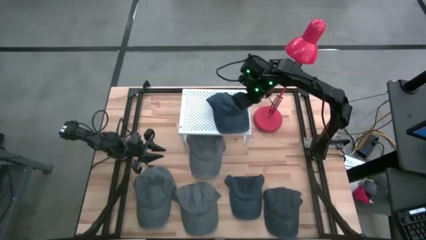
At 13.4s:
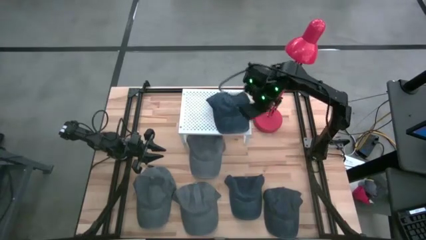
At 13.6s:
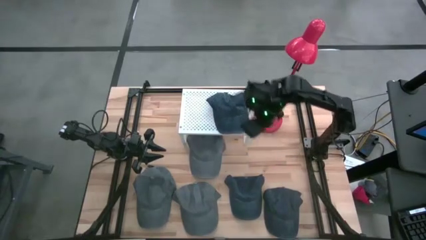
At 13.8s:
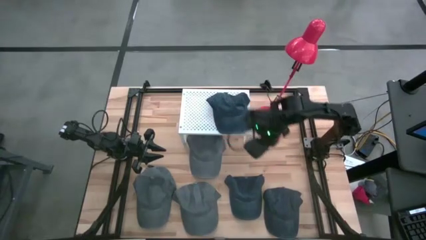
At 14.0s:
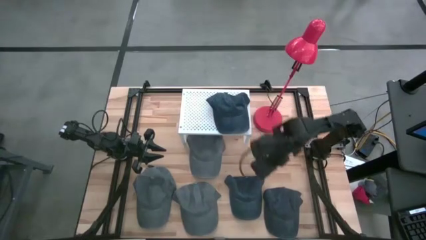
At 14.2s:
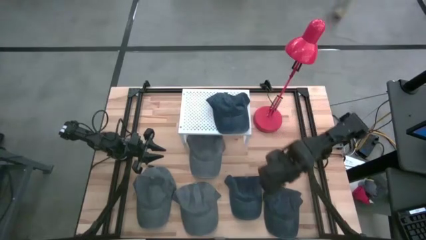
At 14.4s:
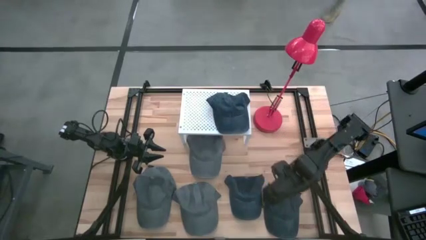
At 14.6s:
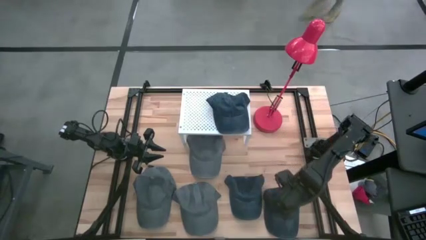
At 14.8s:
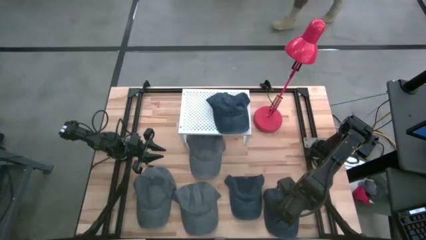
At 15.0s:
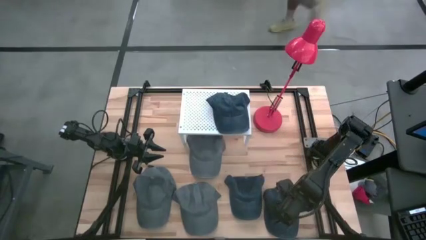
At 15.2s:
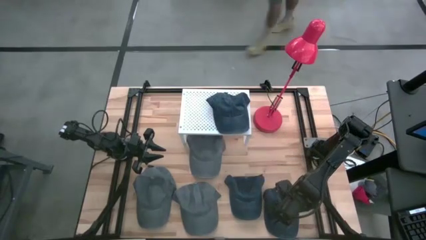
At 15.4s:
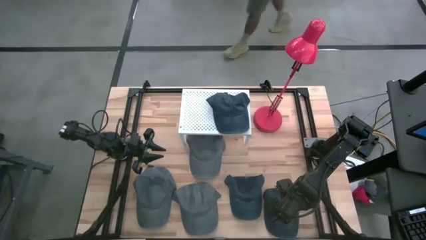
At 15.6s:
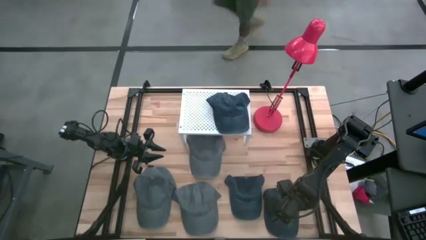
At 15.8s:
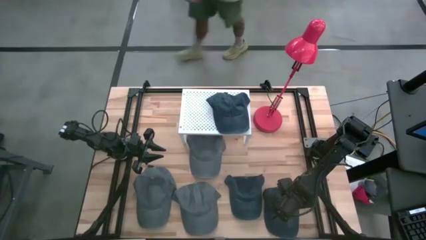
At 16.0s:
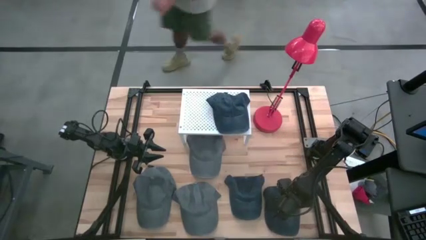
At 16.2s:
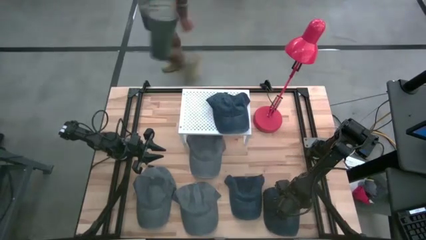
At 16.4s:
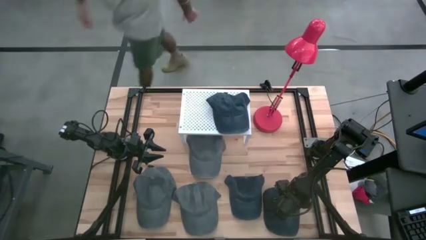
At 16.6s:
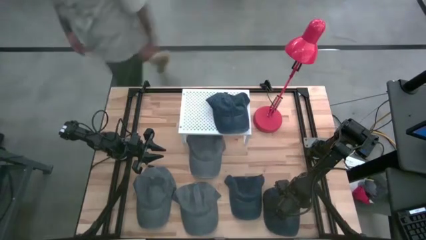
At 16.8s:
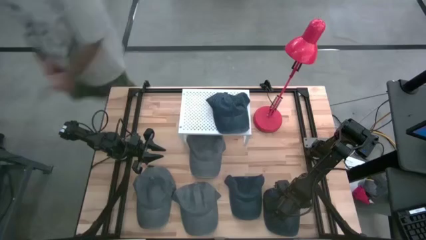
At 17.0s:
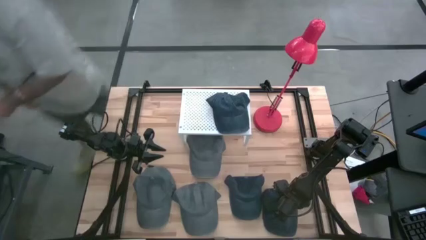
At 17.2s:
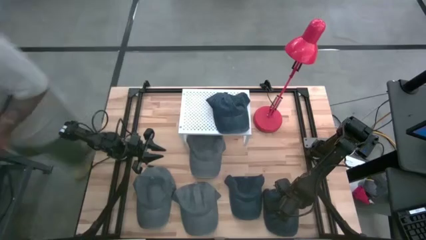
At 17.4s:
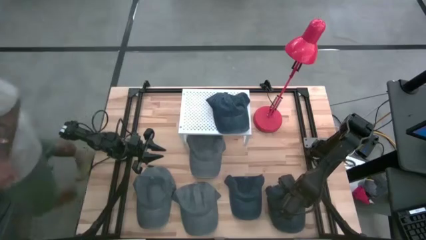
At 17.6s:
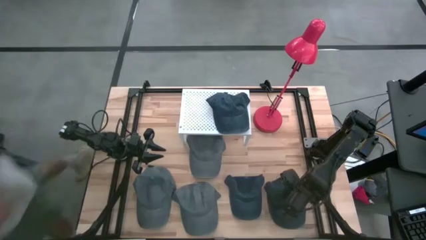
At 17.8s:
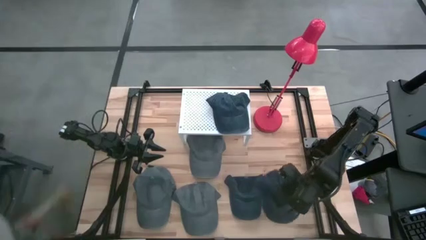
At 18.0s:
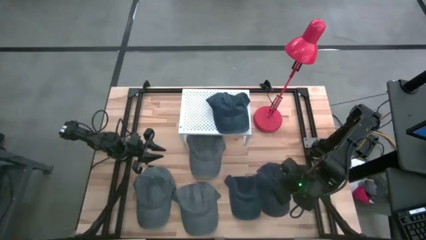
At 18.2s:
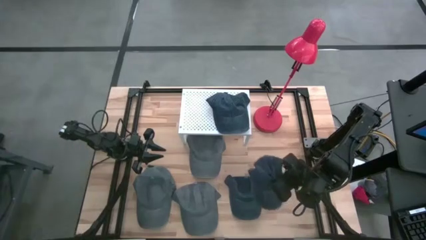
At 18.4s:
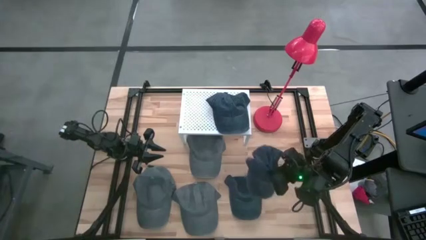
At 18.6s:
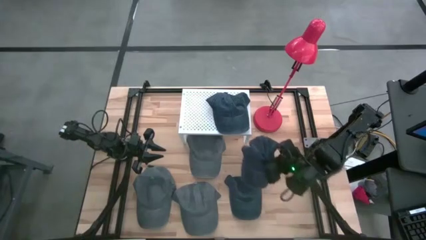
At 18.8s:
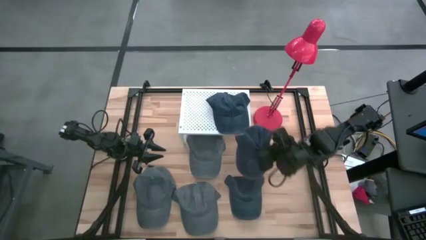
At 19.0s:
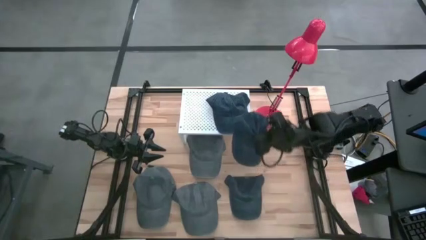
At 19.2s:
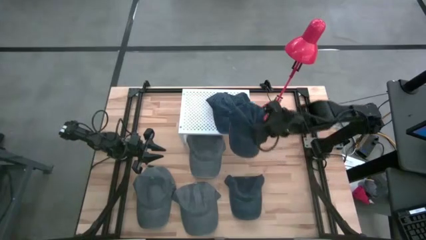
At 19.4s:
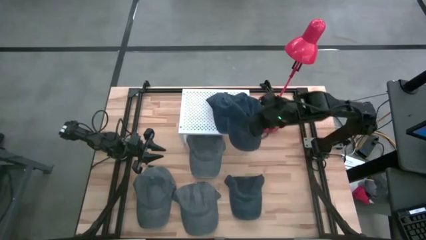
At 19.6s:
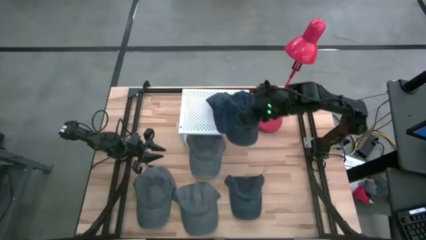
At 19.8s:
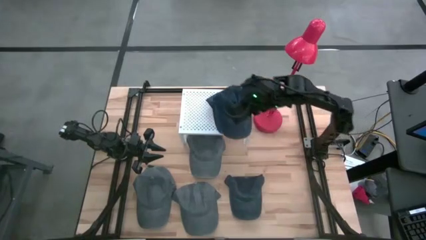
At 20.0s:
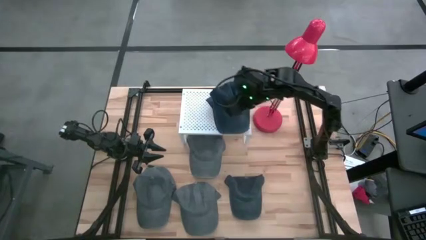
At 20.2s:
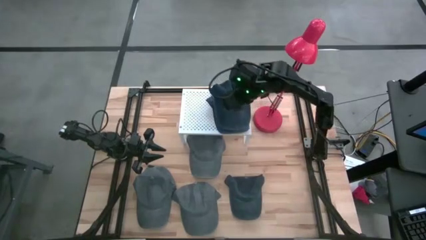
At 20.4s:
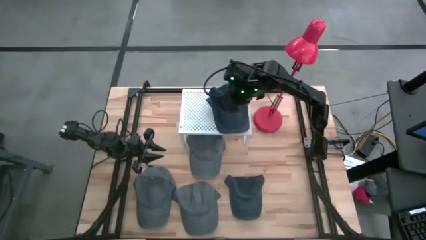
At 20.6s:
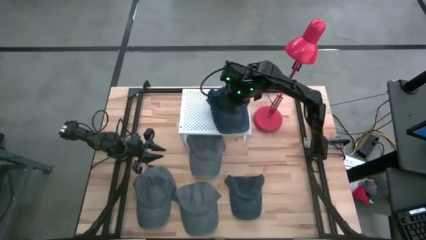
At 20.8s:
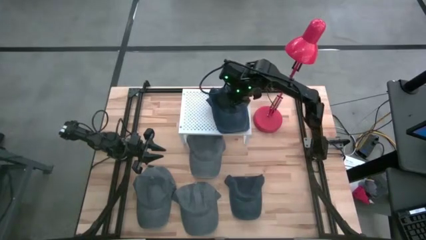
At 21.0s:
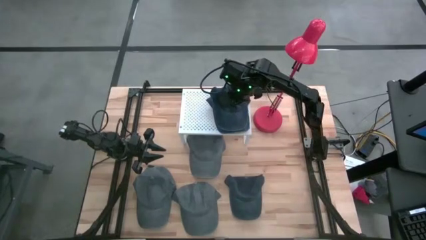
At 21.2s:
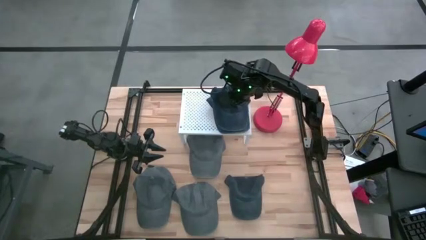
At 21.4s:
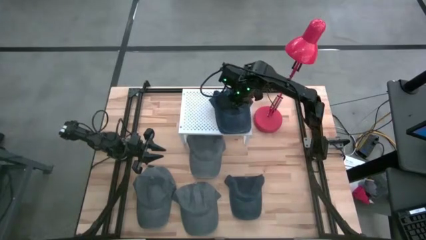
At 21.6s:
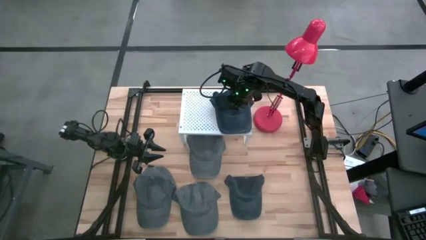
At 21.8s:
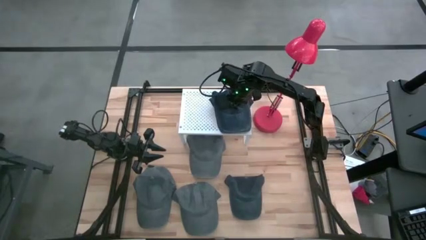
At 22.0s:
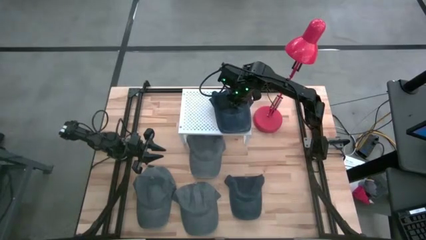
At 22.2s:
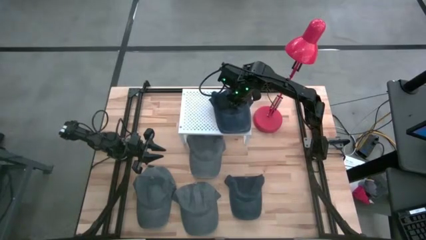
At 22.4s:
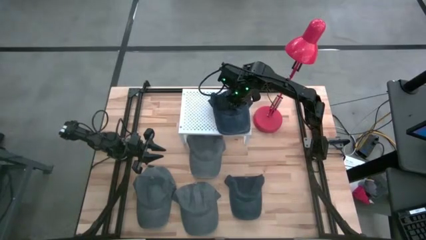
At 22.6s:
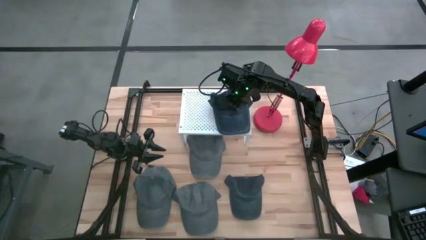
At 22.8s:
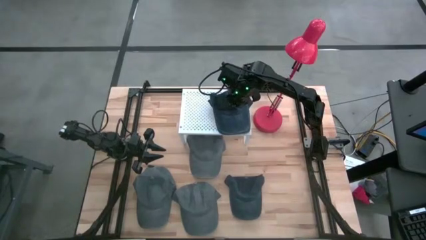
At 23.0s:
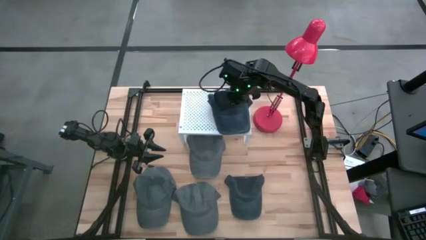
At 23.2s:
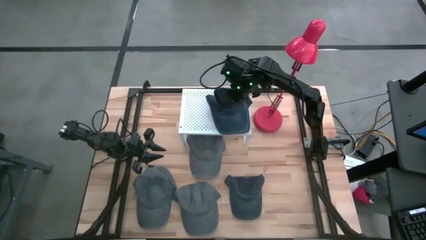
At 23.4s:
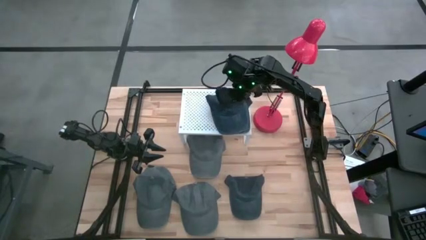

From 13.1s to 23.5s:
Task: Pick & Place hat
Stack the right black cap on top of the black cap on the shelf

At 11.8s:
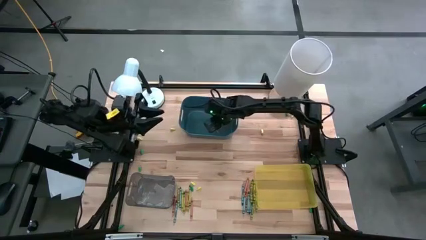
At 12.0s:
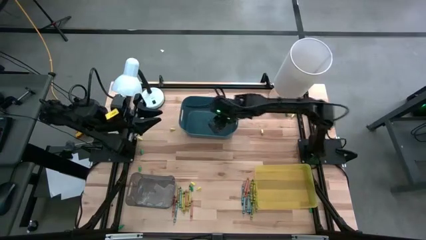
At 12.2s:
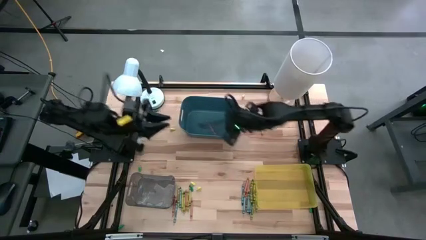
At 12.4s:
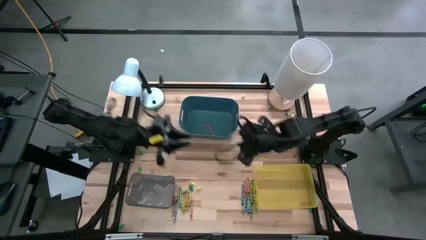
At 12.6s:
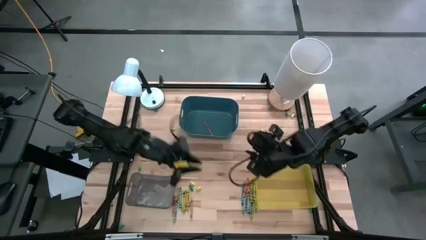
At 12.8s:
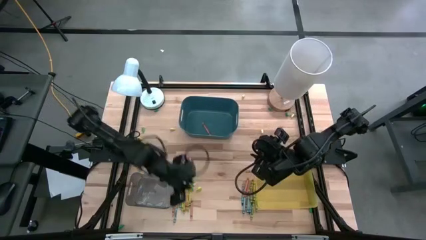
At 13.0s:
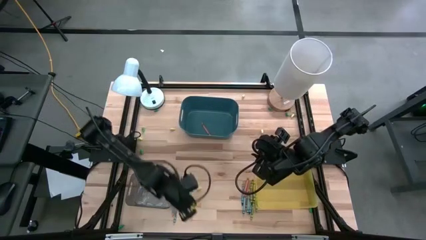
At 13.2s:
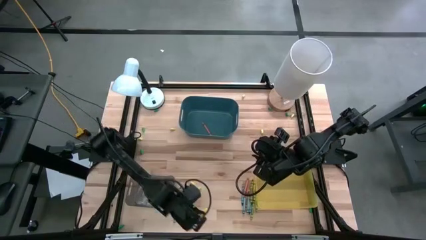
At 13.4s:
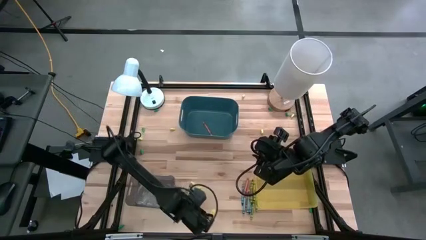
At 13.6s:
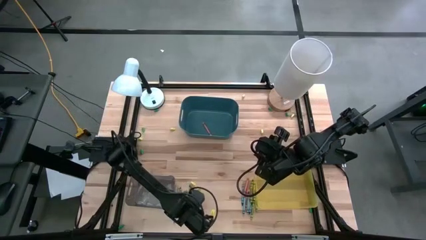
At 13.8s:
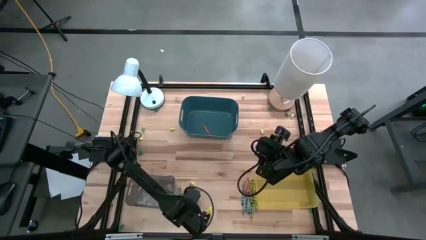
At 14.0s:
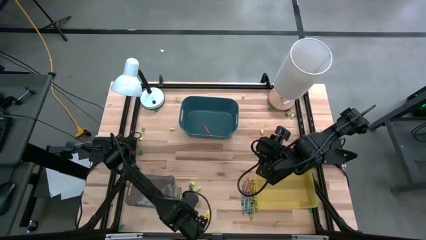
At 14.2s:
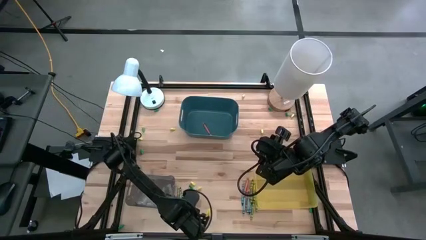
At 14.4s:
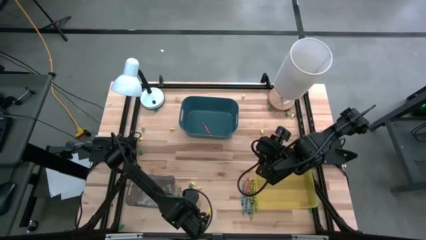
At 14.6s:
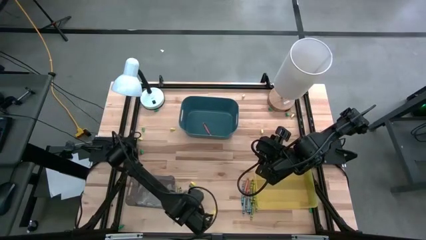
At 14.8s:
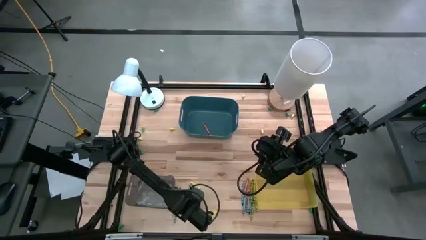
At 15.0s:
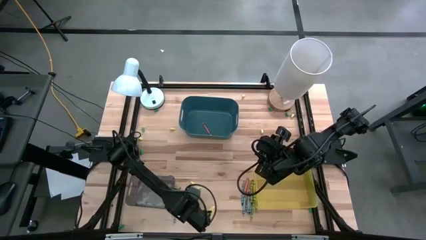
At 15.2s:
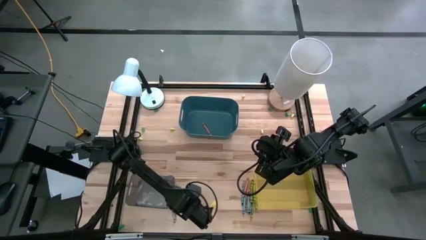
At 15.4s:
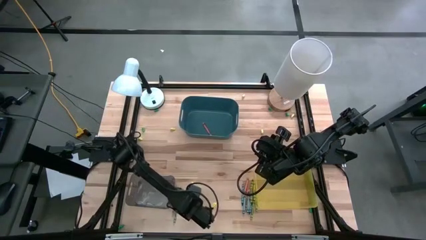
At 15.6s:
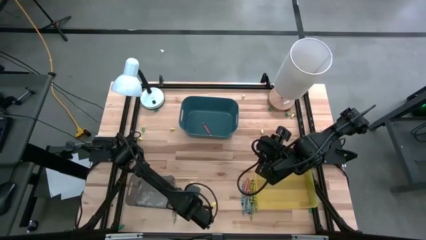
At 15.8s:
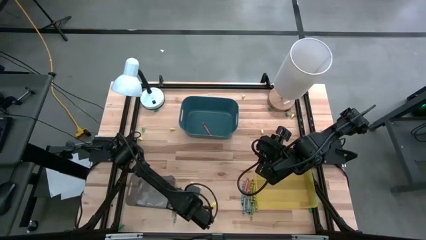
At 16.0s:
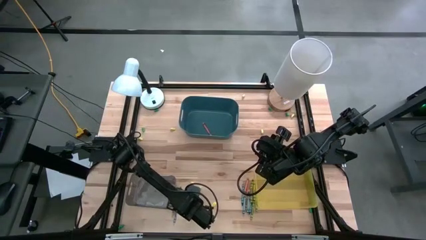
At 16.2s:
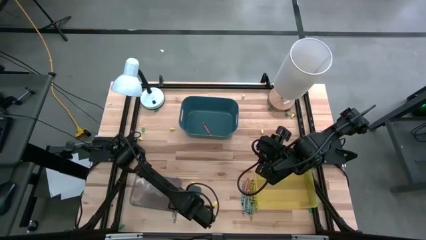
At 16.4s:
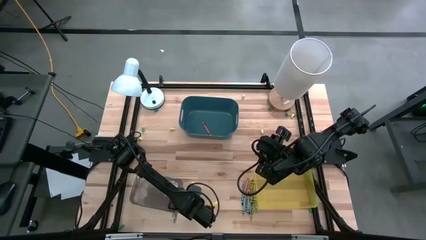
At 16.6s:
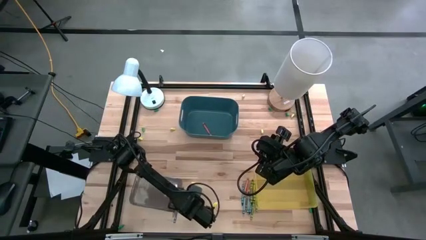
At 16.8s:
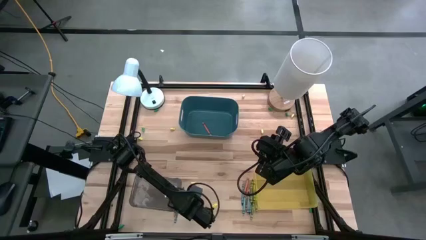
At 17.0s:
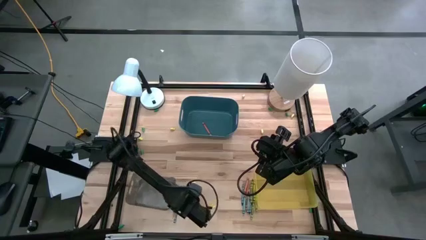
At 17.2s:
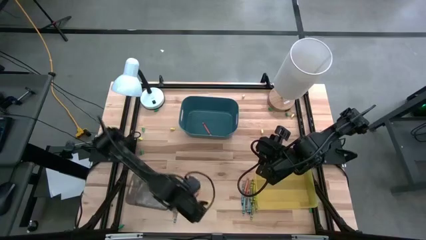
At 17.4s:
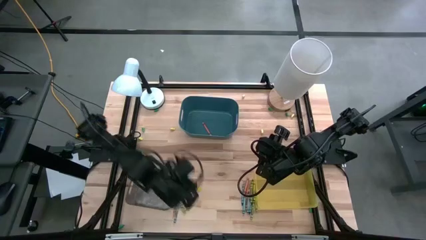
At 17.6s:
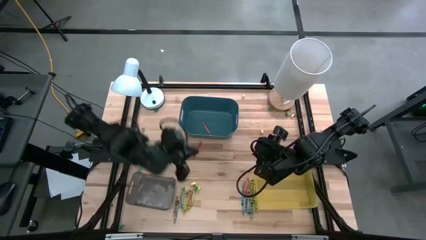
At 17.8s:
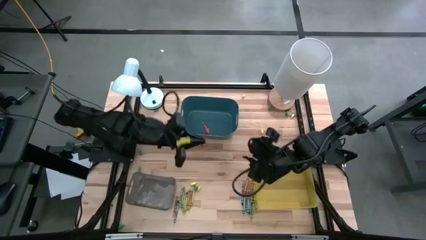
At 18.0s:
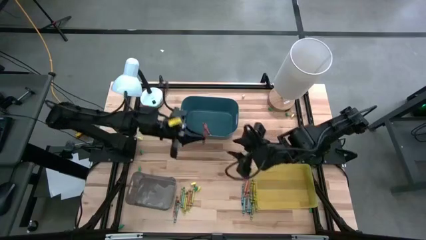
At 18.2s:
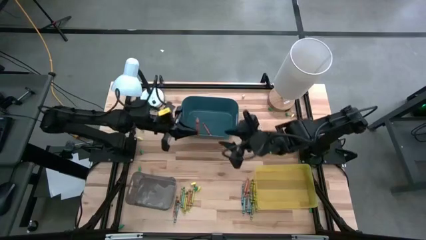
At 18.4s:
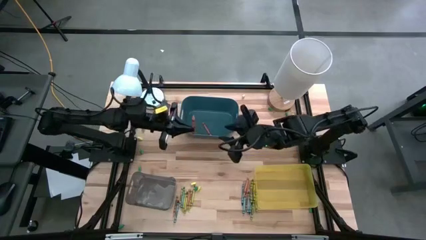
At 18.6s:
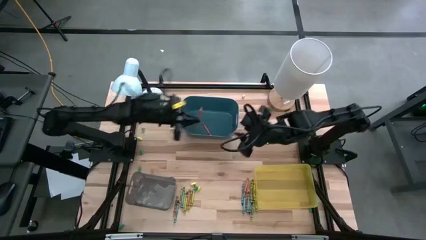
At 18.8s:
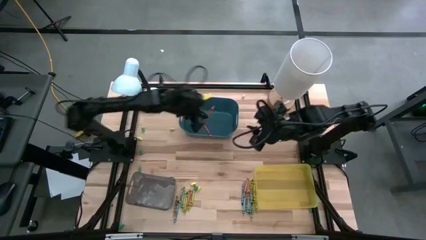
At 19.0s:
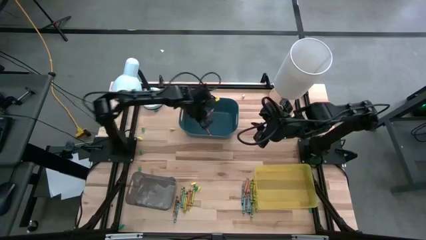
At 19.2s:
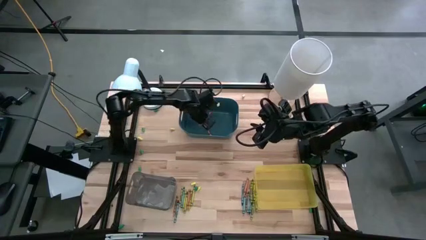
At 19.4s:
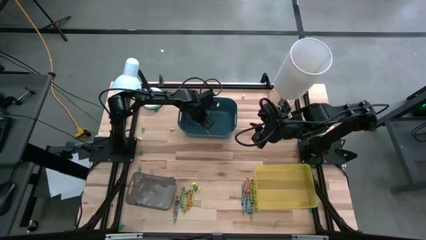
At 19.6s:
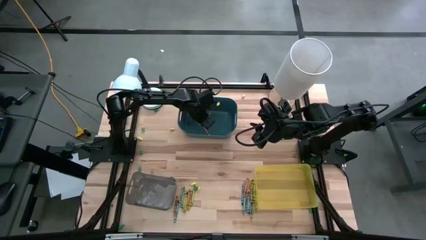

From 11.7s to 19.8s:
Task: Sort crayons
Put the orange crayon into the blue bin
